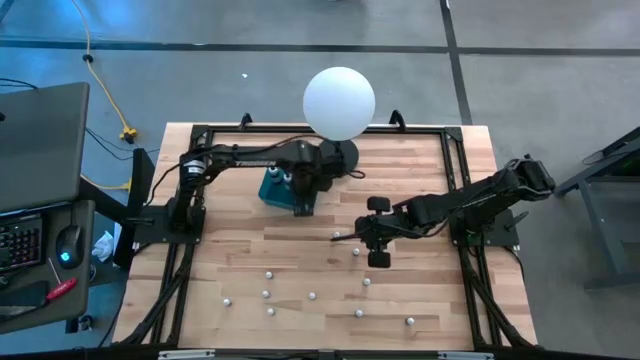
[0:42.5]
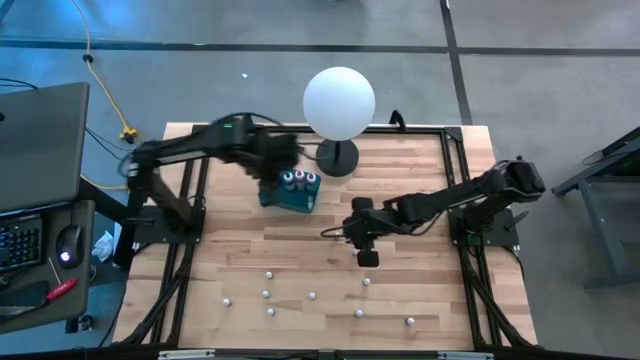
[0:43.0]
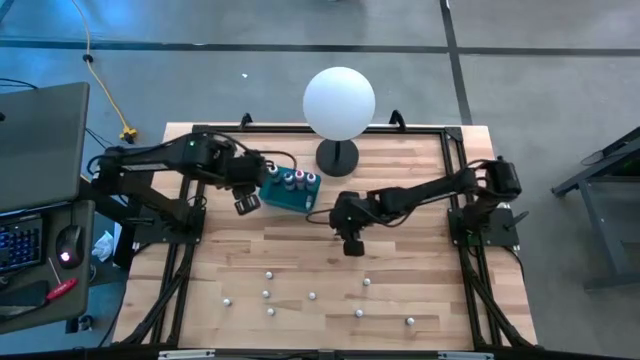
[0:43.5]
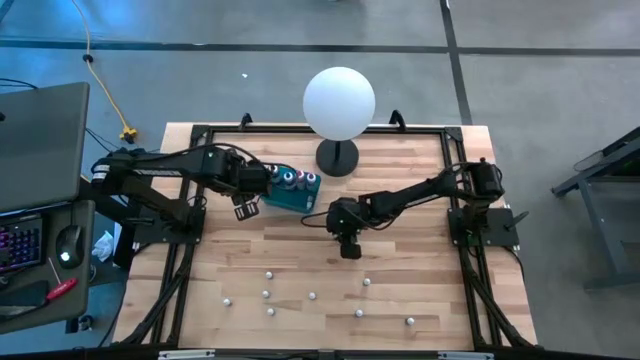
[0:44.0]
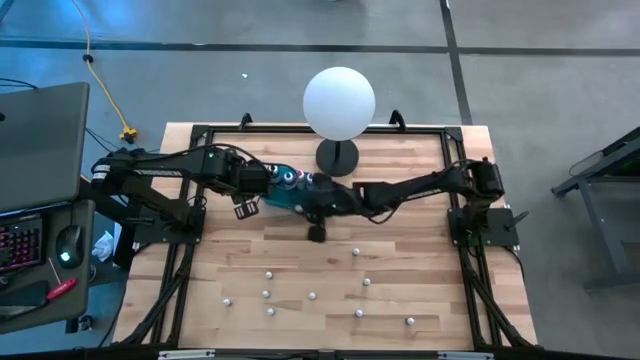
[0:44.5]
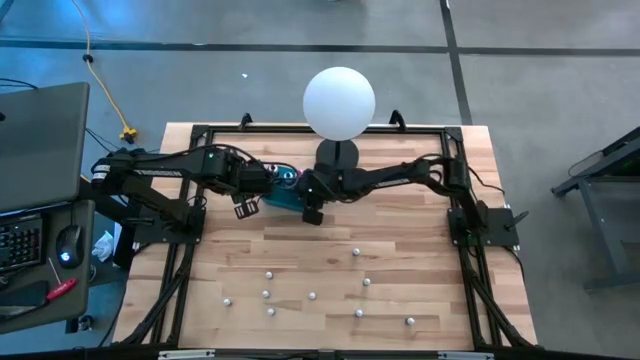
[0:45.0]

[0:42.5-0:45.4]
Task: Pick & Place food coloring
Put the small red food coloring bottle into the blue bin

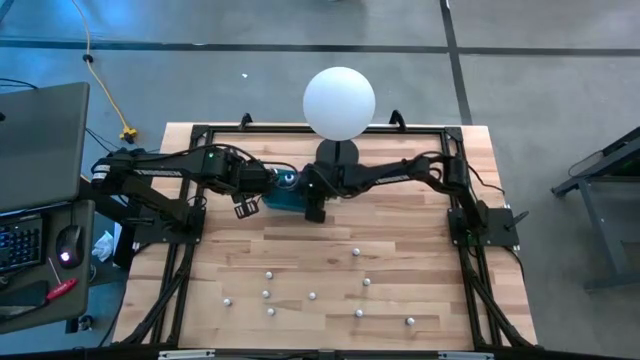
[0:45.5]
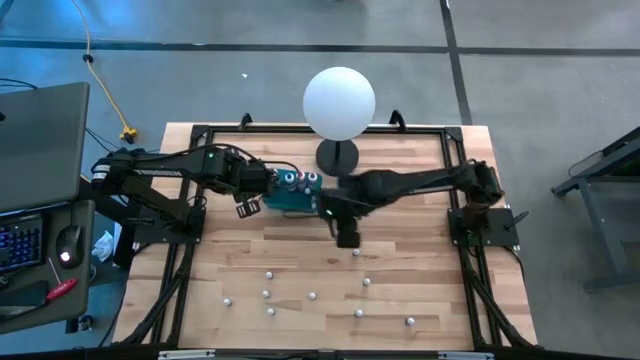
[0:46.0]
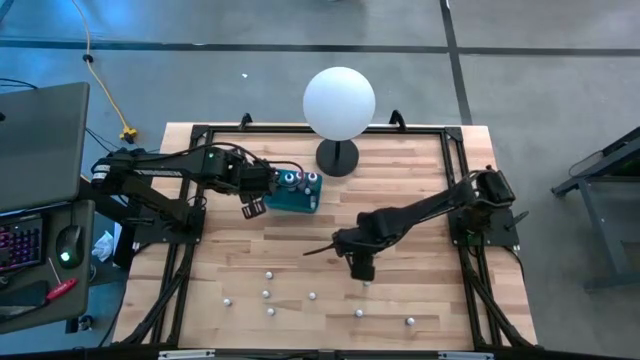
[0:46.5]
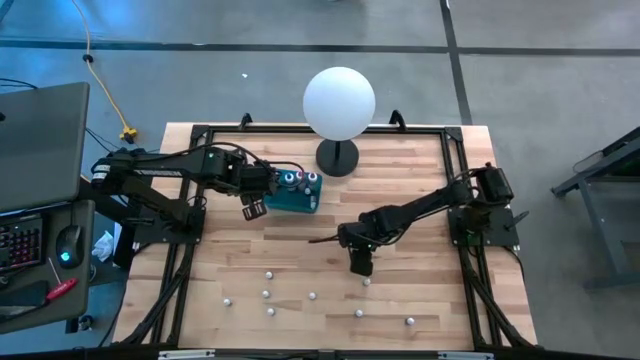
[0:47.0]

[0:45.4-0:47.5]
Put the small purple food coloring bottle into the blue bin

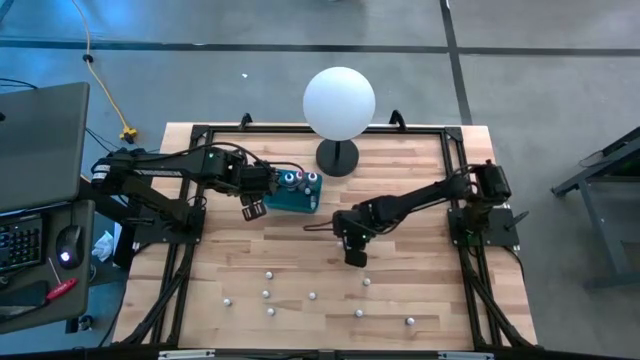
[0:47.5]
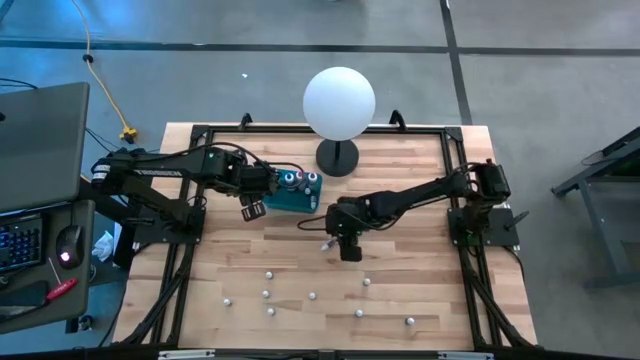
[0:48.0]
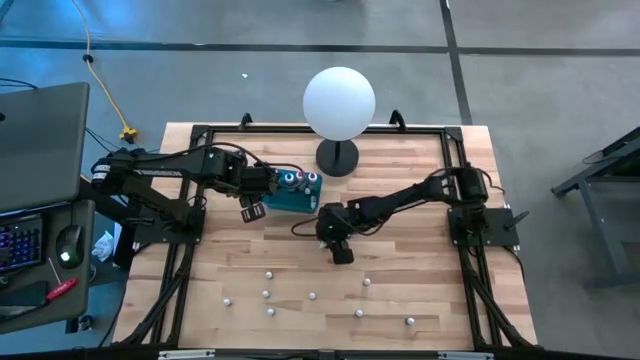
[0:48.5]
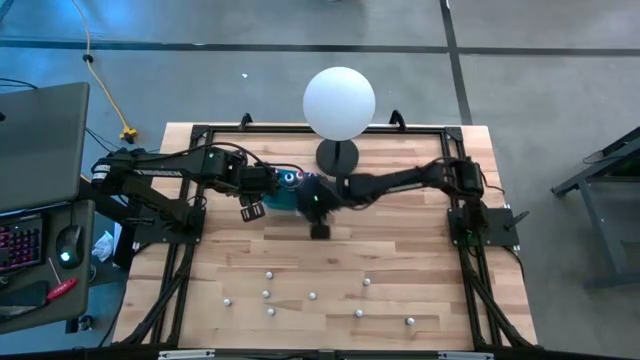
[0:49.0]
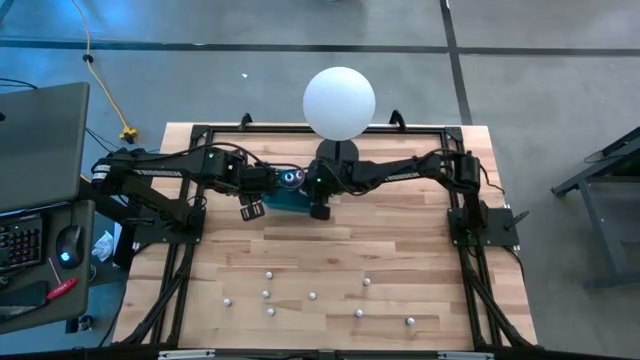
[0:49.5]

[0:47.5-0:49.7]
Put the small purple food coloring bottle into the blue bin

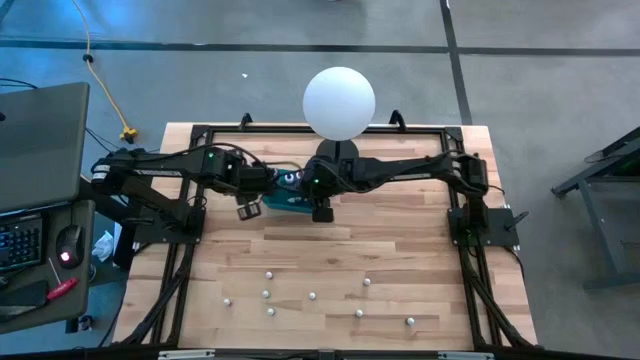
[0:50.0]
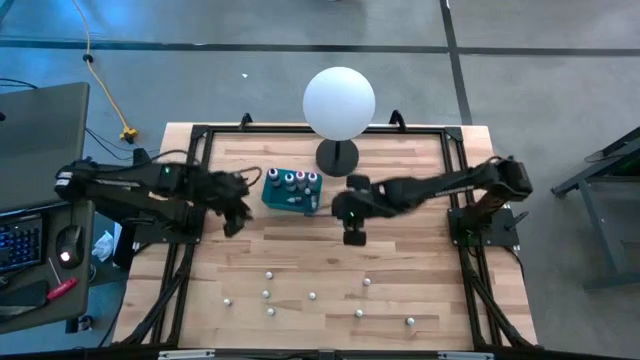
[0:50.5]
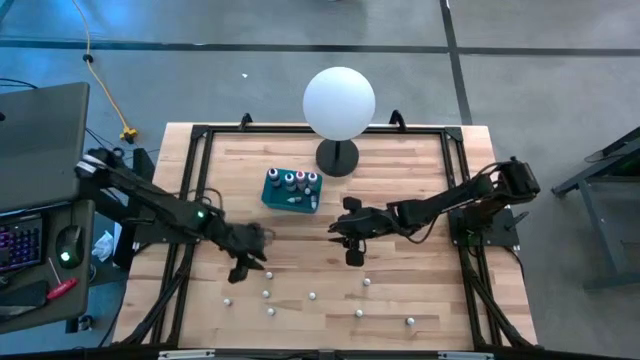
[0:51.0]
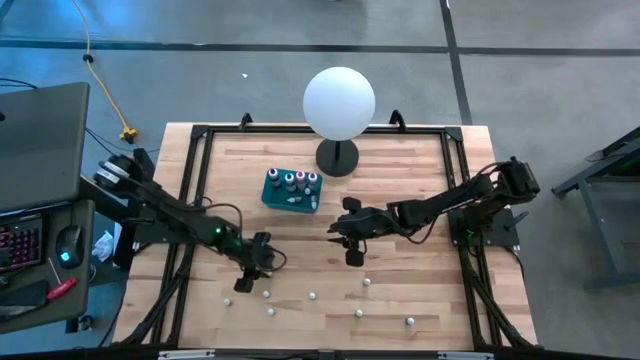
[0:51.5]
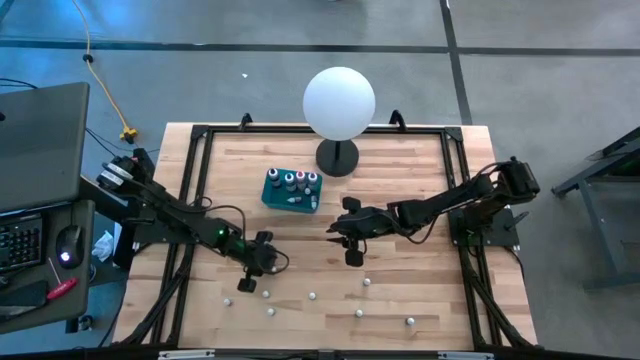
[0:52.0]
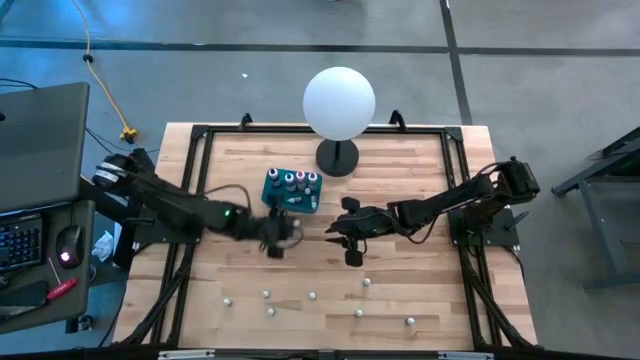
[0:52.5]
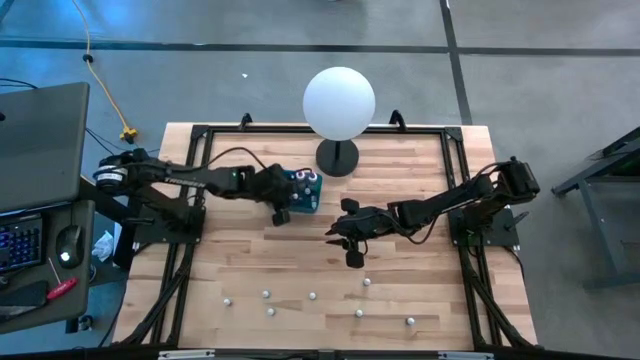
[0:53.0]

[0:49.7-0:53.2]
Put the small purple food coloring bottle into the blue bin

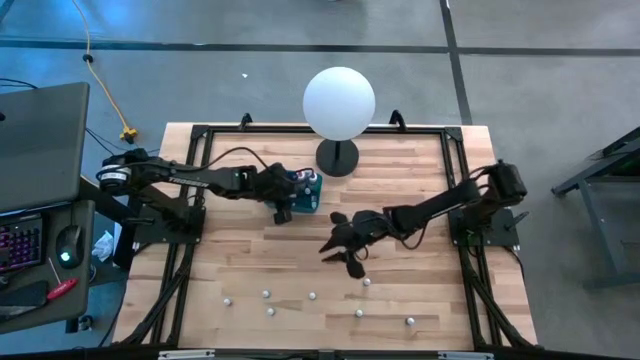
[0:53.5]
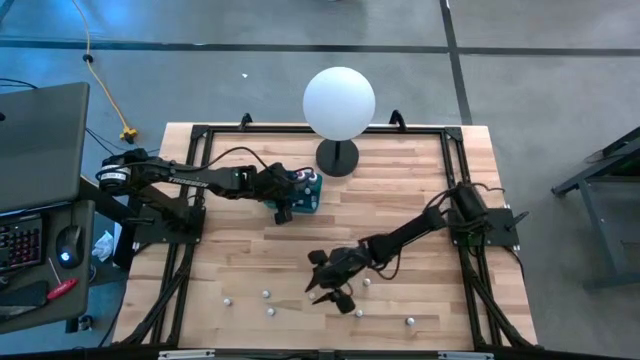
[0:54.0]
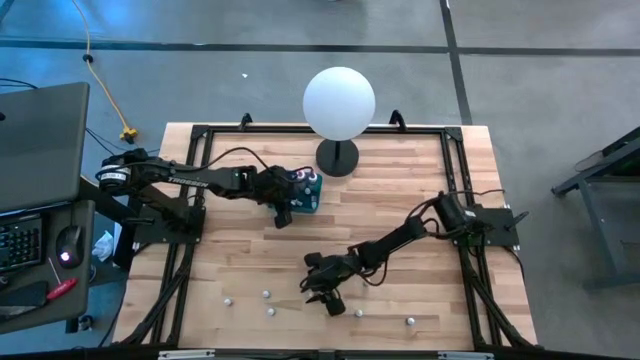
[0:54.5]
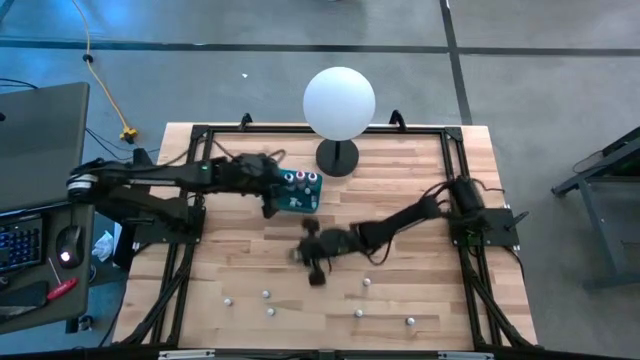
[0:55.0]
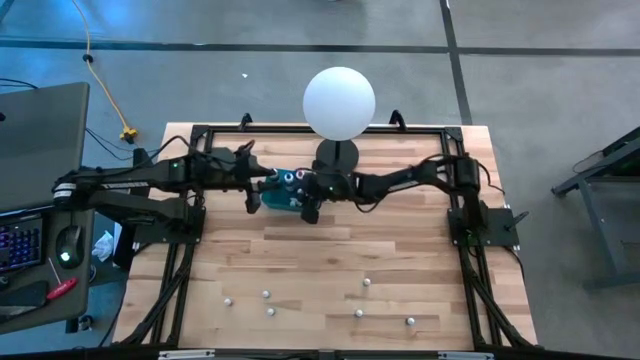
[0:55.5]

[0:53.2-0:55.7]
Put the small purple food coloring bottle into the blue bin

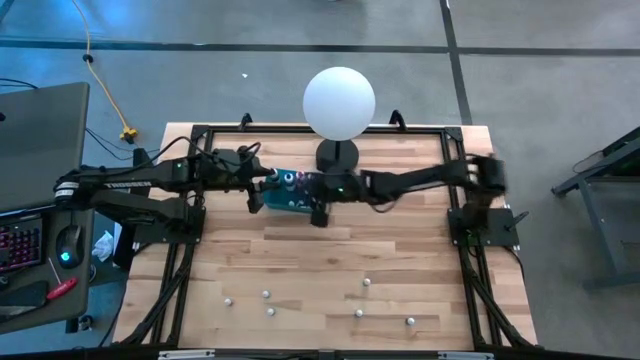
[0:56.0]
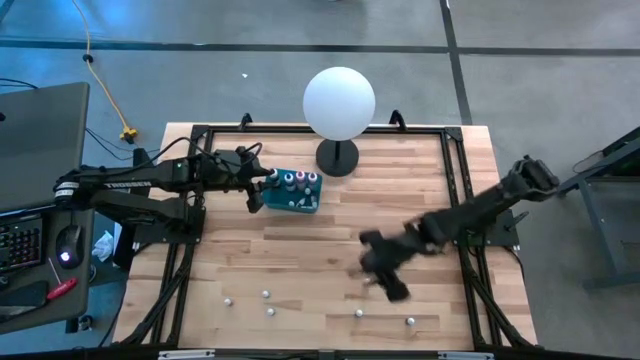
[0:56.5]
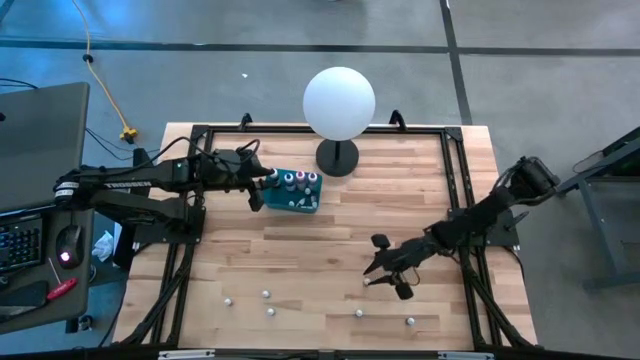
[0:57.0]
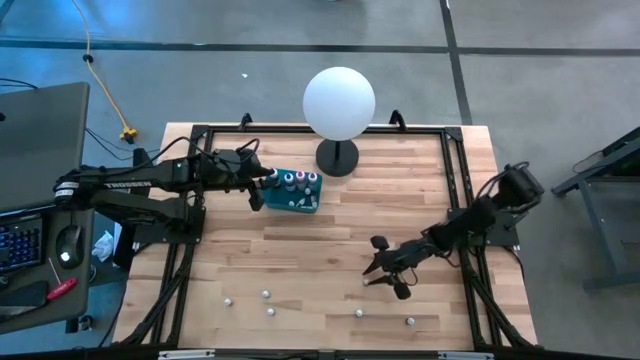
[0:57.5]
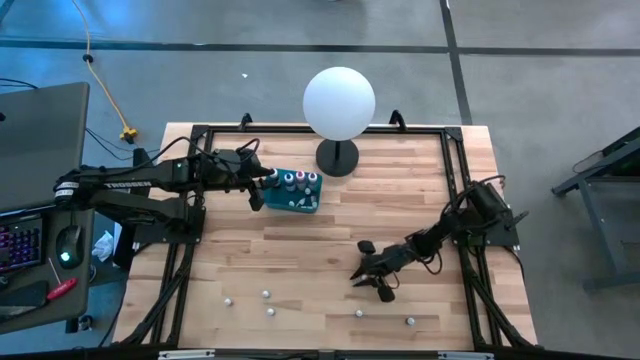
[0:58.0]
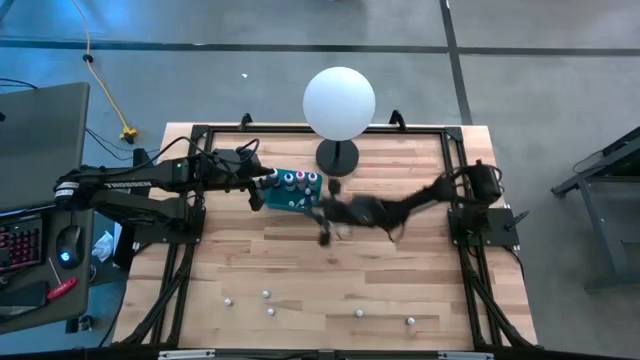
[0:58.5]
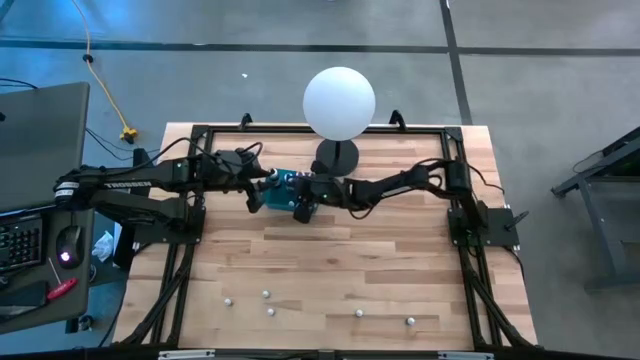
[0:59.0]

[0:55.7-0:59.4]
Put the small purple food coloring bottle into the blue bin

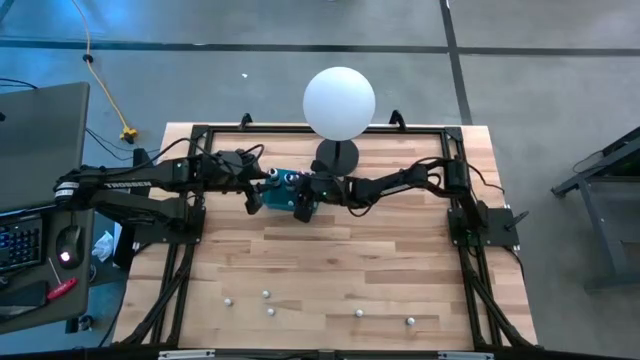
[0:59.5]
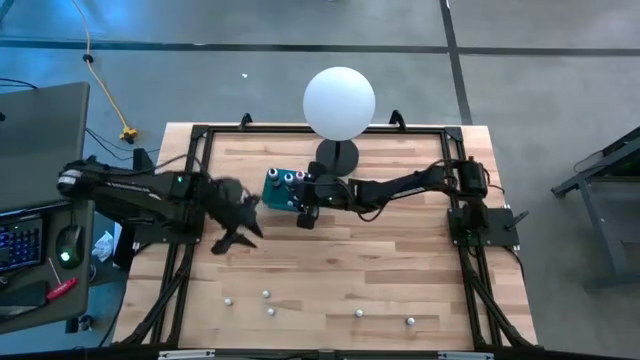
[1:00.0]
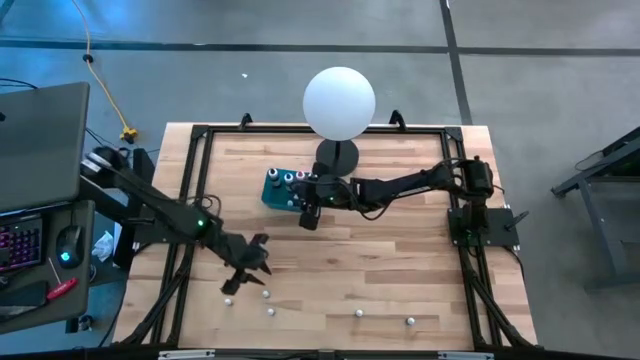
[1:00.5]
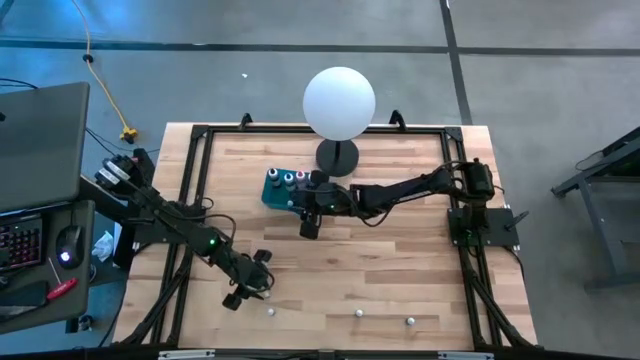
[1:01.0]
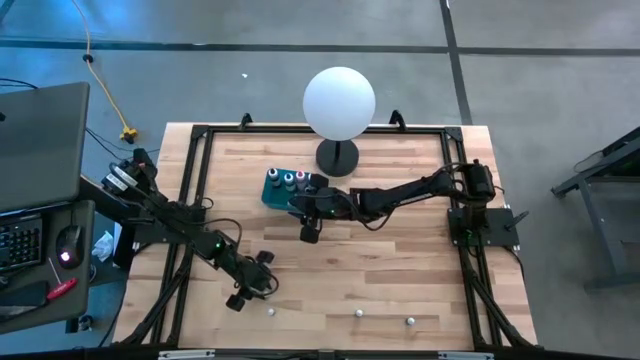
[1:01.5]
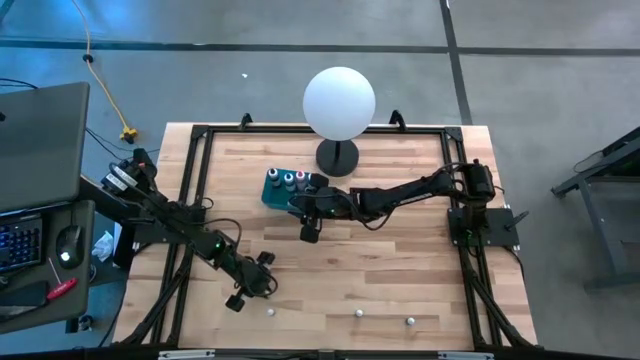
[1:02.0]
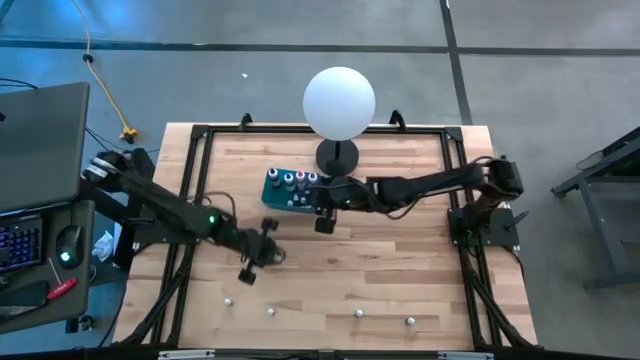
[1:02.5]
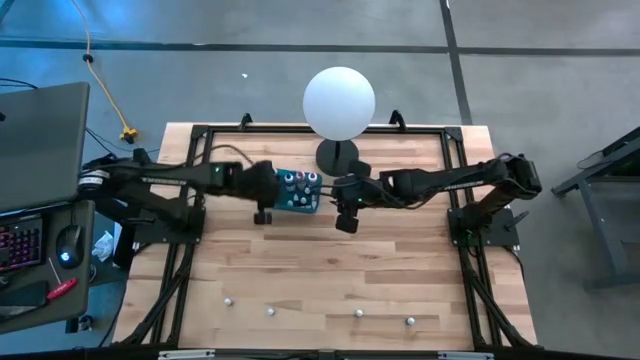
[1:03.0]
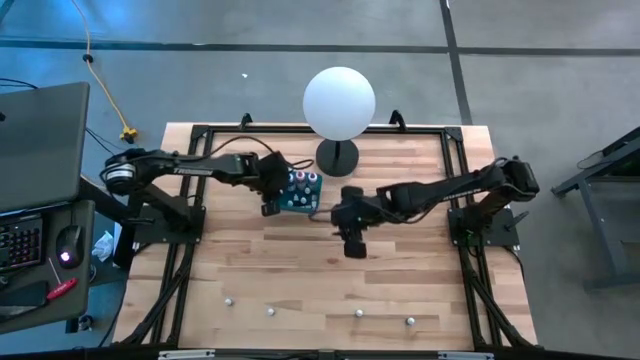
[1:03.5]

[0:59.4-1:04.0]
Put the small purple food coloring bottle into the blue bin

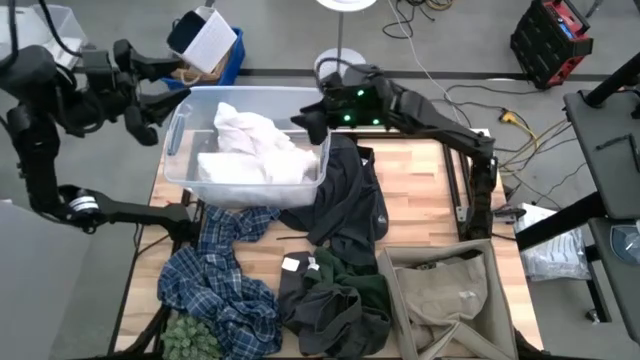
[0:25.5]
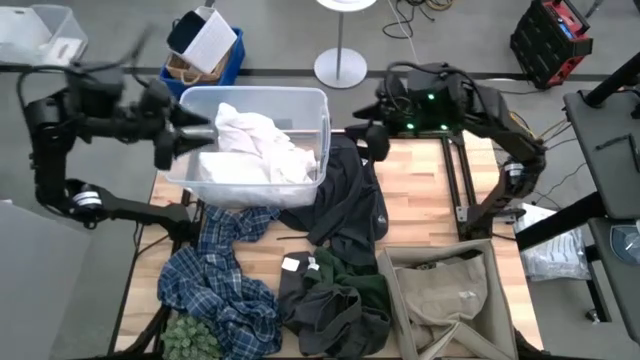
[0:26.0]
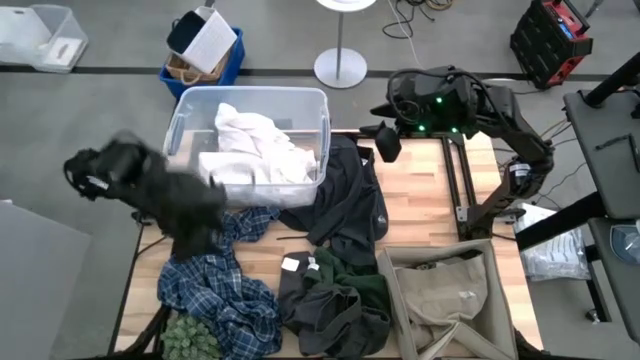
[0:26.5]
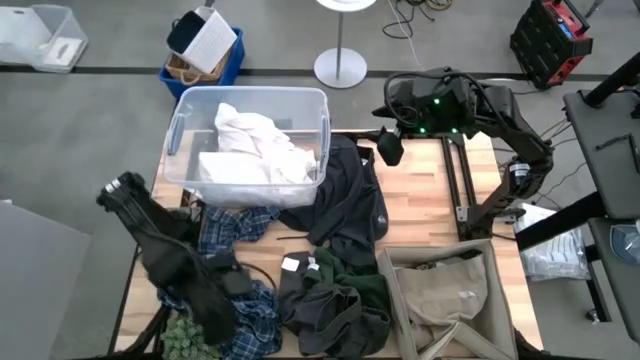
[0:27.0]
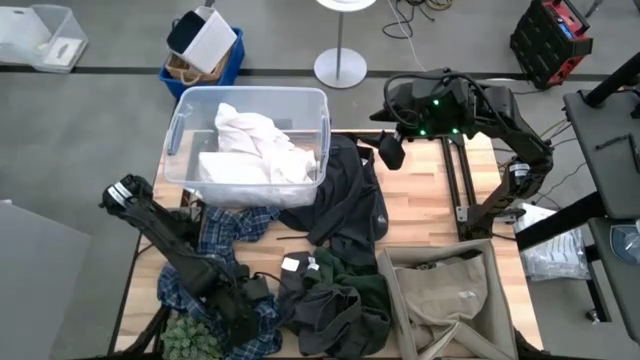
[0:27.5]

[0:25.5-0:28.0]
Task: Sort clothes
Put the blue checkered shirt into the laundry organizer
